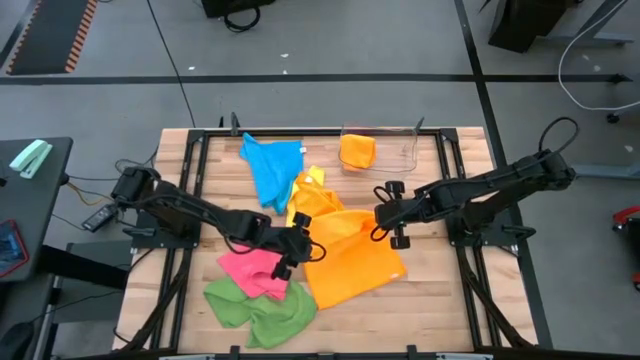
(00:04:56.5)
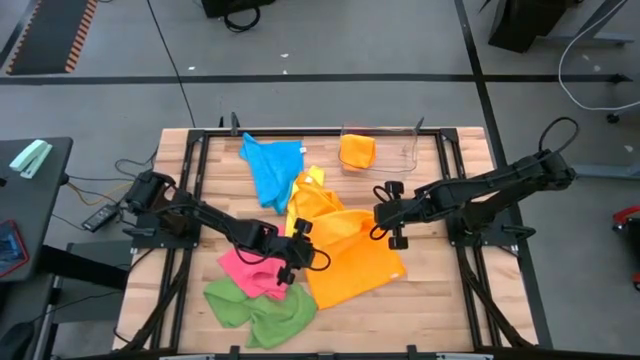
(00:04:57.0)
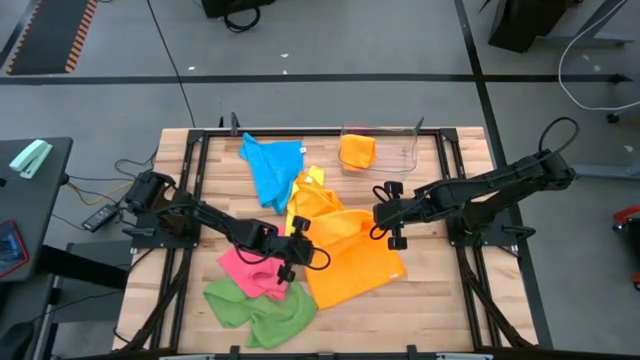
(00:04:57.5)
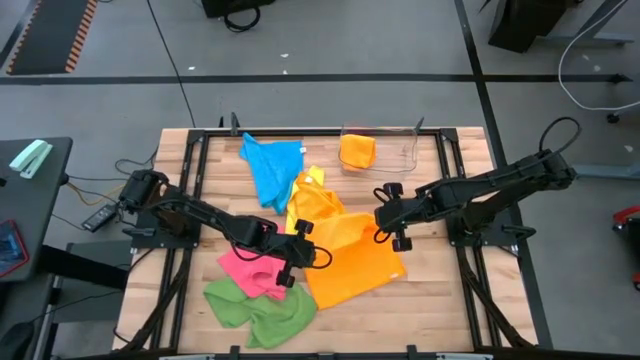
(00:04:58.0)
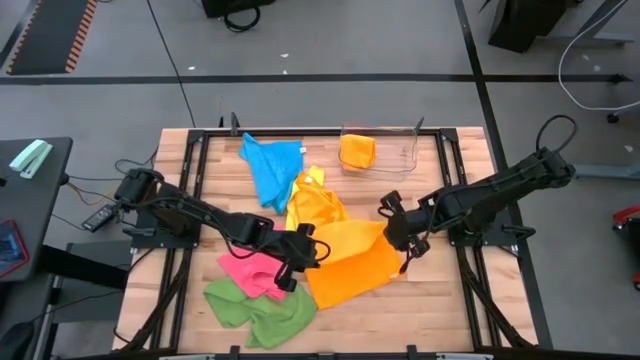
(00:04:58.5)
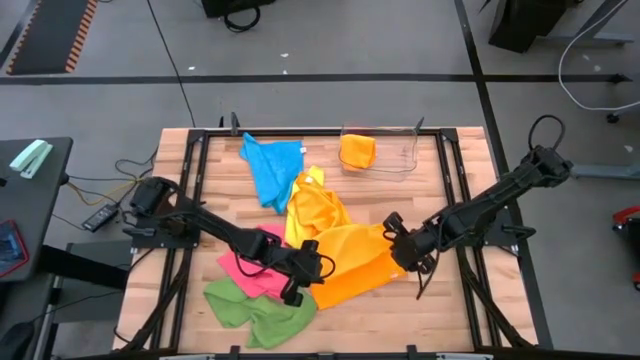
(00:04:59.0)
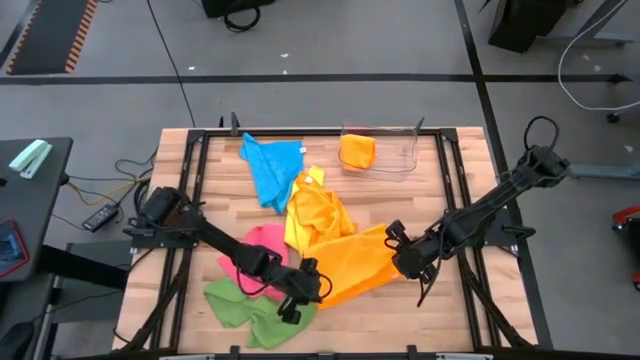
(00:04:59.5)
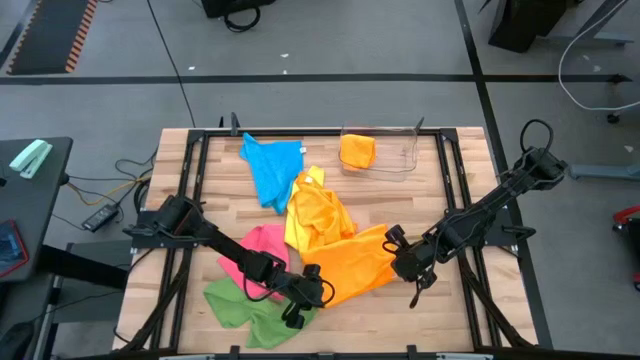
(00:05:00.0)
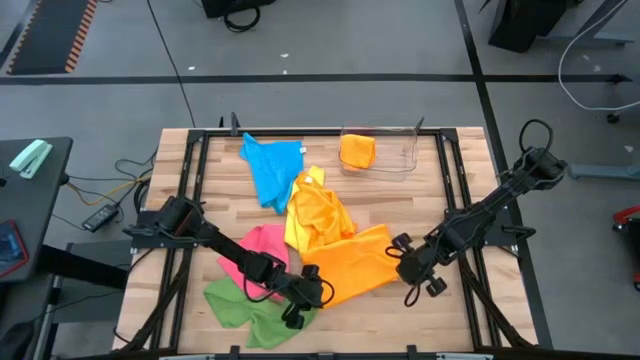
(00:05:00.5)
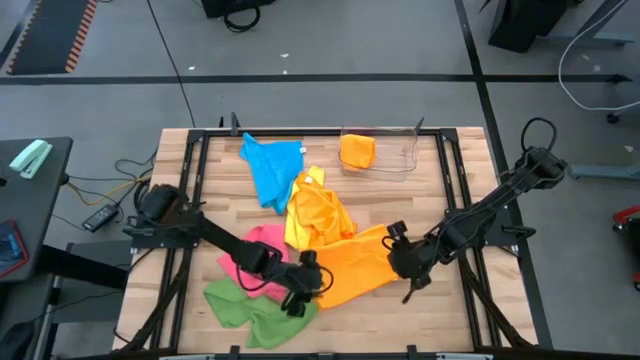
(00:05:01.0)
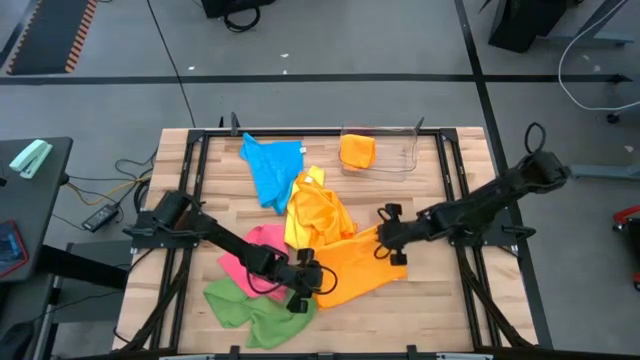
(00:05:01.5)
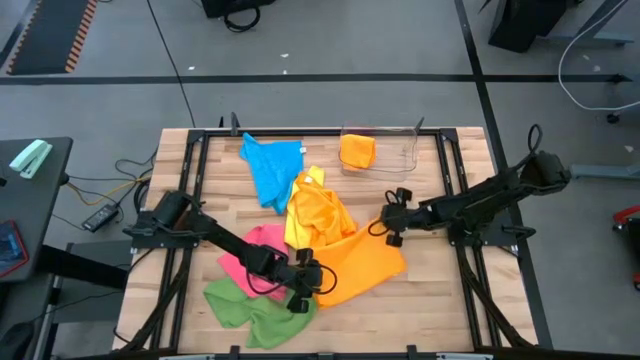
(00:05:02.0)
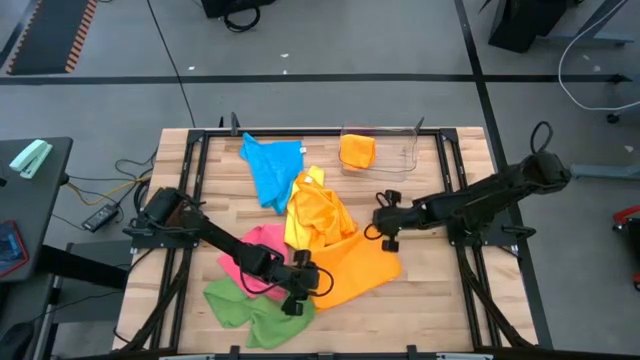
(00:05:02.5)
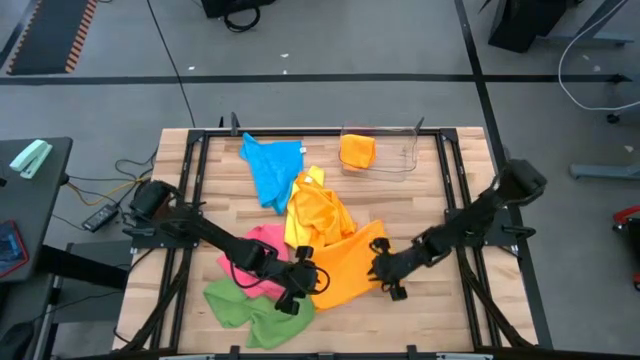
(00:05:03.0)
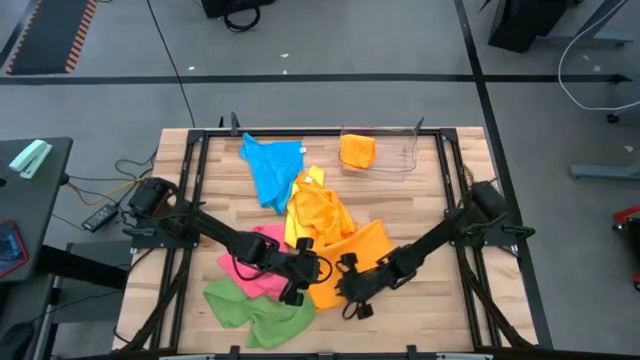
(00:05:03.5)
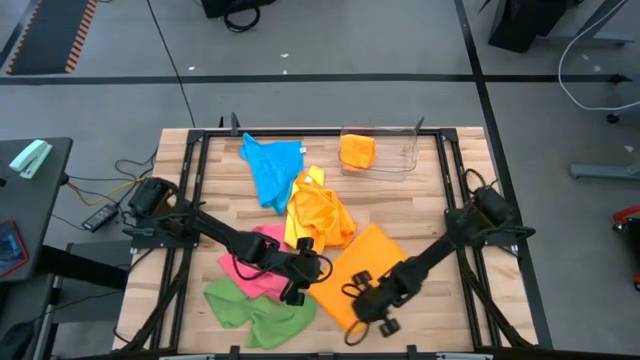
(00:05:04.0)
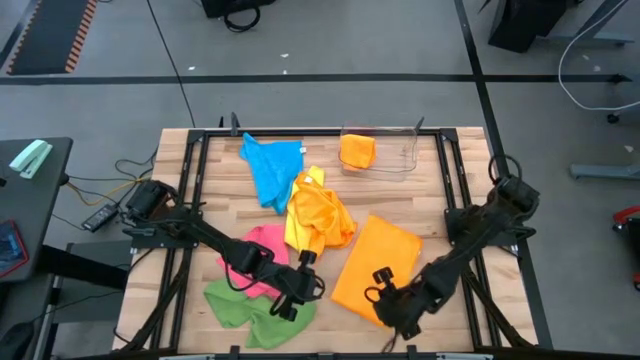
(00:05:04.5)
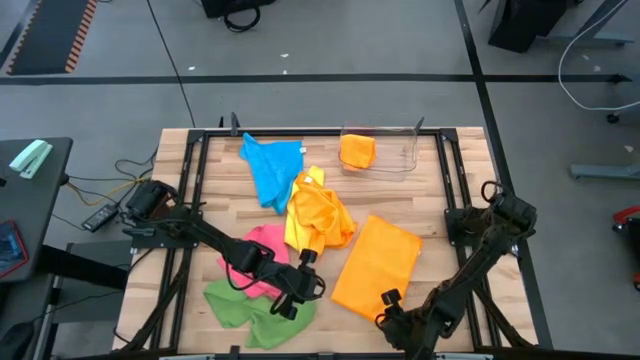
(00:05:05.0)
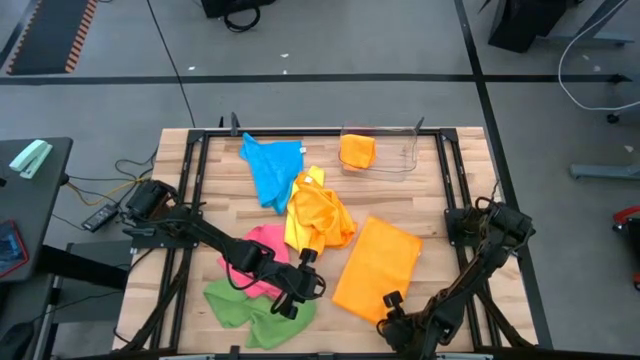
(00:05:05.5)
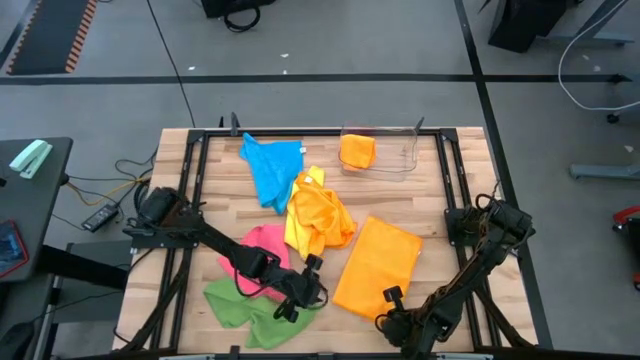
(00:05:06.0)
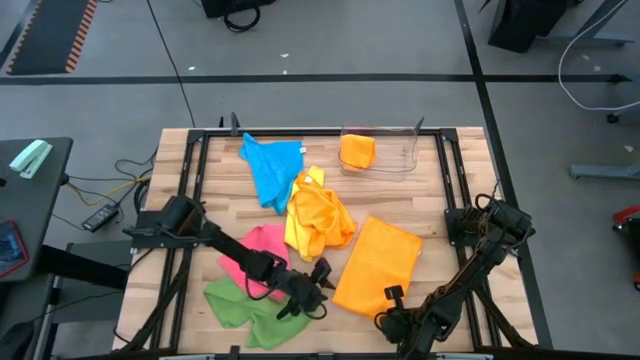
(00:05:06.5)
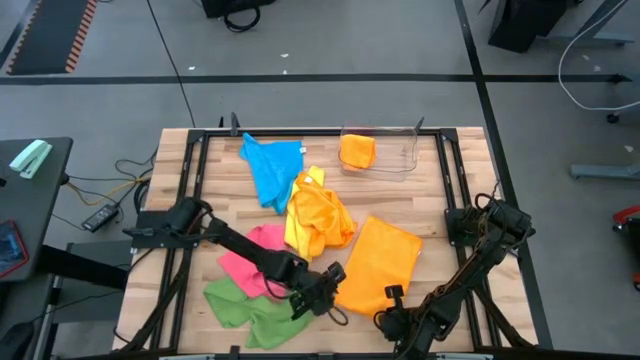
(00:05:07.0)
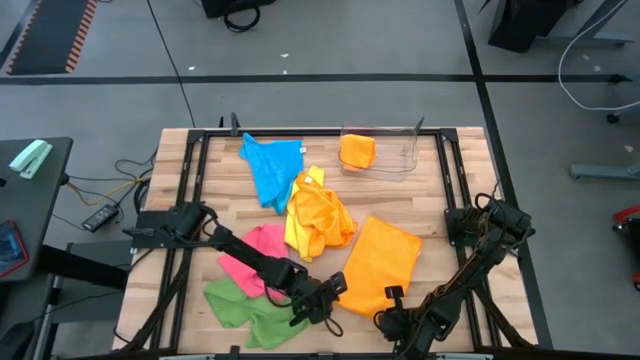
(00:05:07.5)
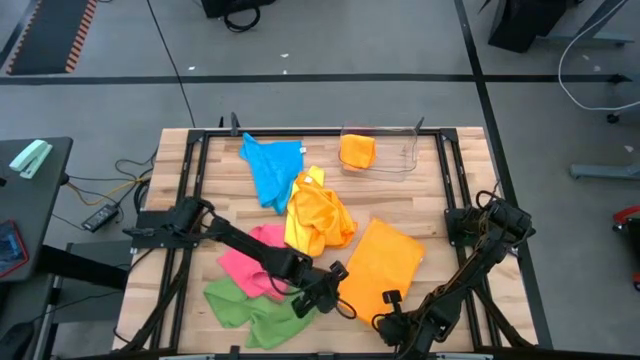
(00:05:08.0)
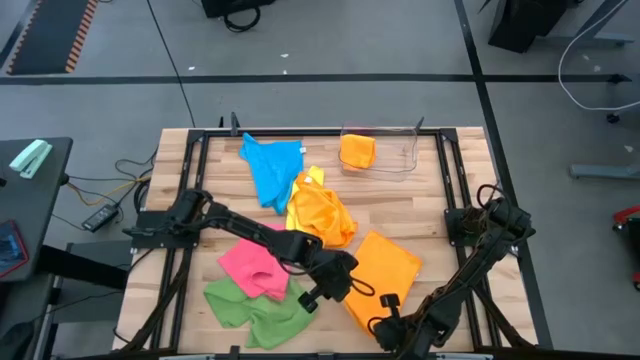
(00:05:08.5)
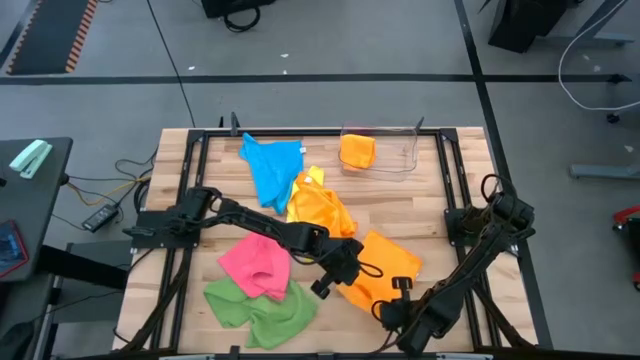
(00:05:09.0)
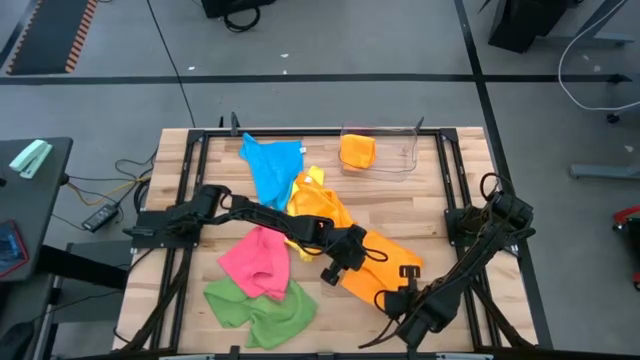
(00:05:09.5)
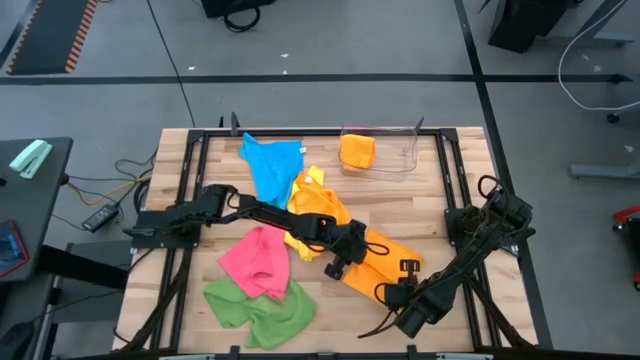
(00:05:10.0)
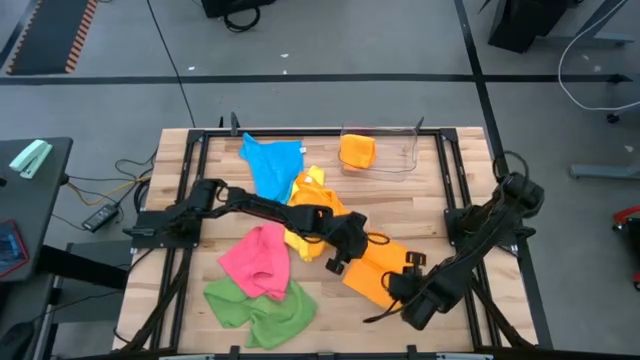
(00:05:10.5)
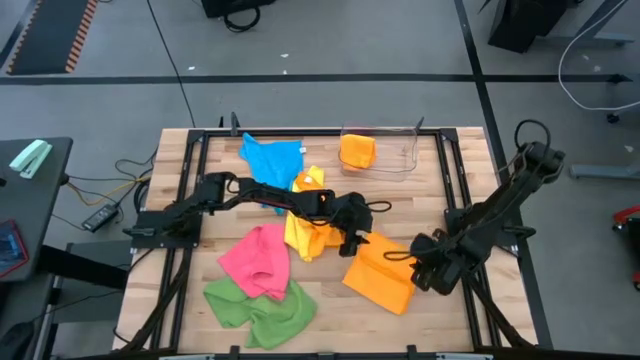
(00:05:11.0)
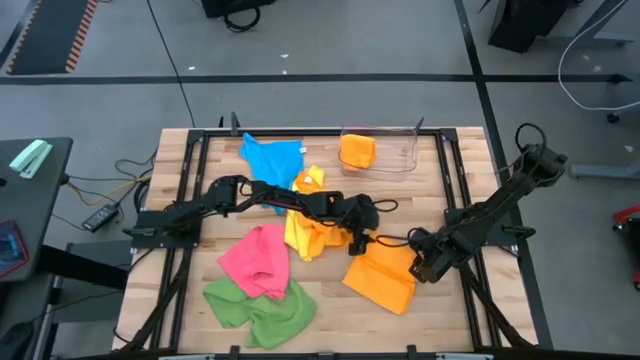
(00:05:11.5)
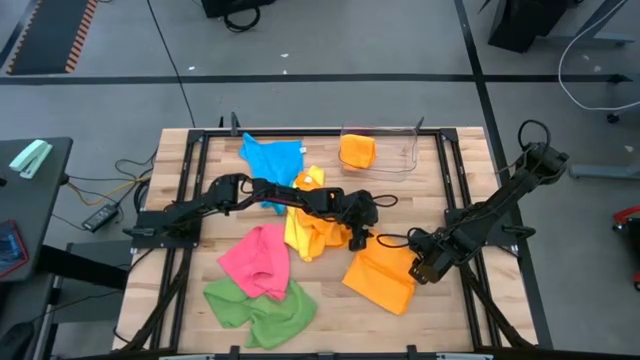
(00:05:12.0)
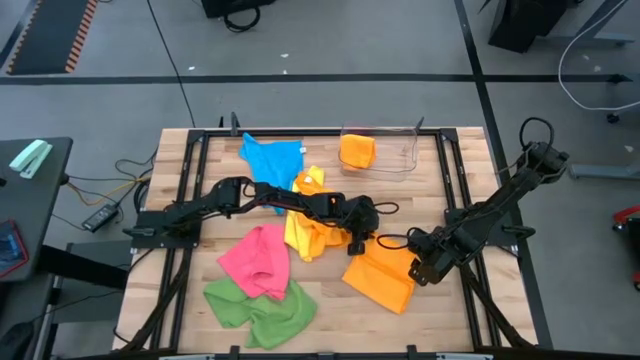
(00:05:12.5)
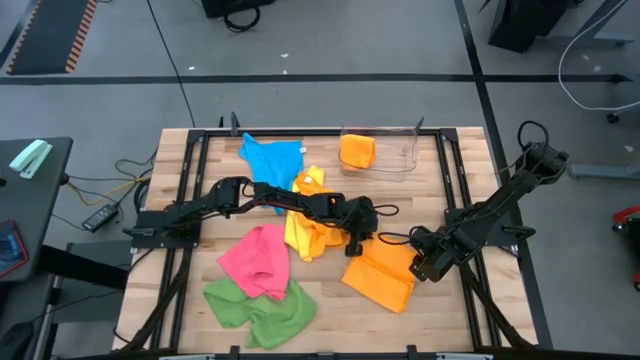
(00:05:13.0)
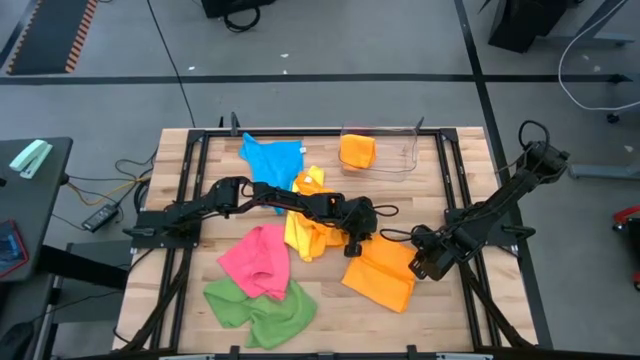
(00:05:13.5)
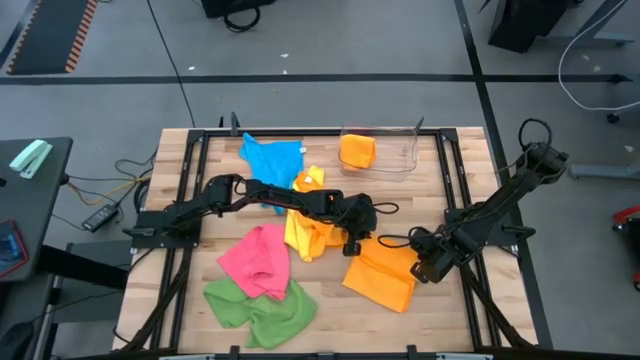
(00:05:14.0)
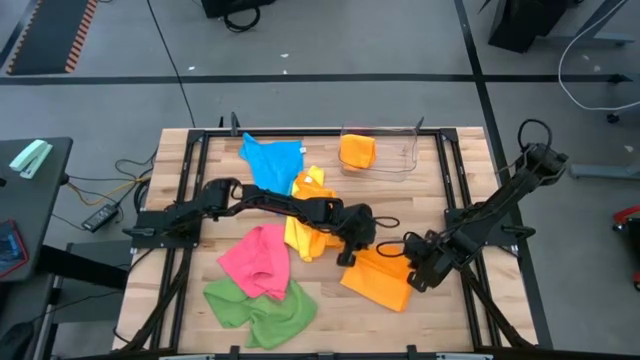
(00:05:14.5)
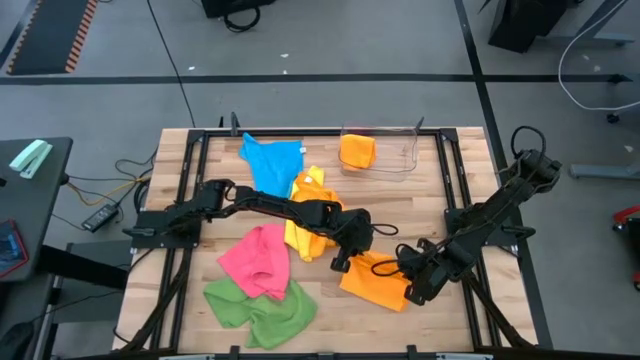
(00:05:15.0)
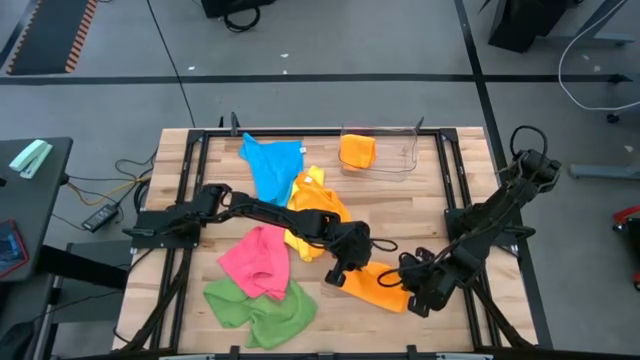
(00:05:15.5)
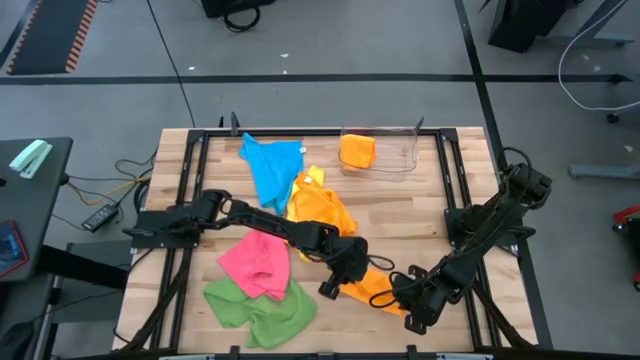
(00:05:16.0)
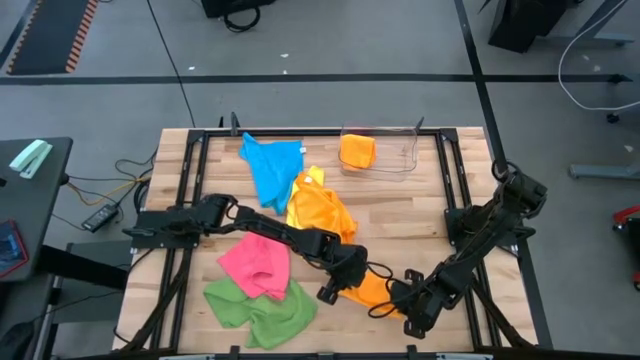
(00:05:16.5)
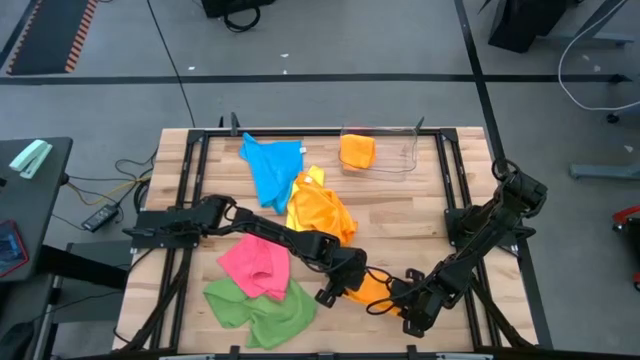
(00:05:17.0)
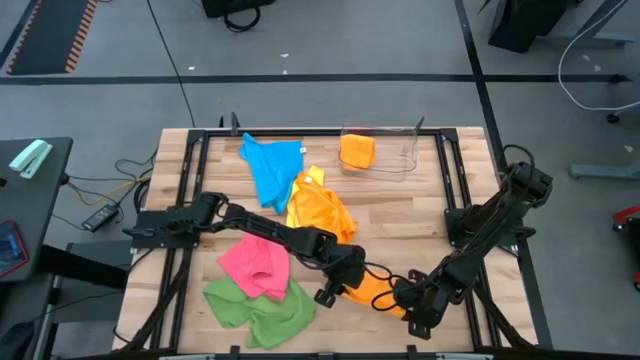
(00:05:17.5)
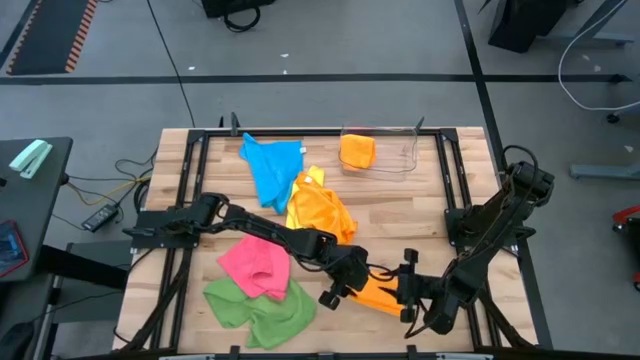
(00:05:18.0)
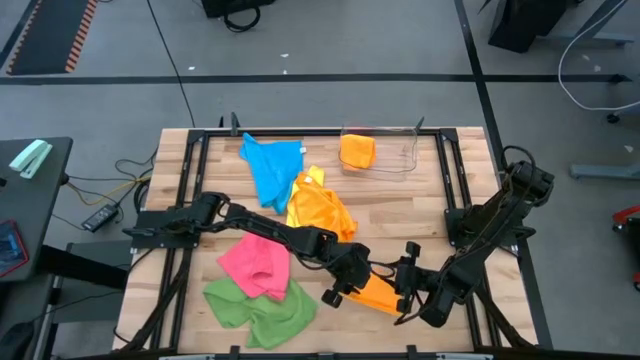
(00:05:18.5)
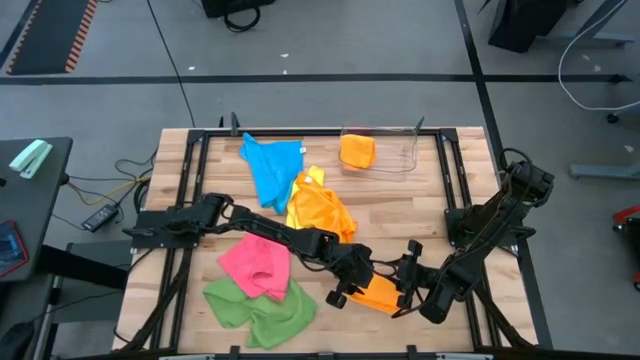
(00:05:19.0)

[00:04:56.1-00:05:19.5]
Task: Fold microfiber towels
Fold the right orange microfiber cloth
